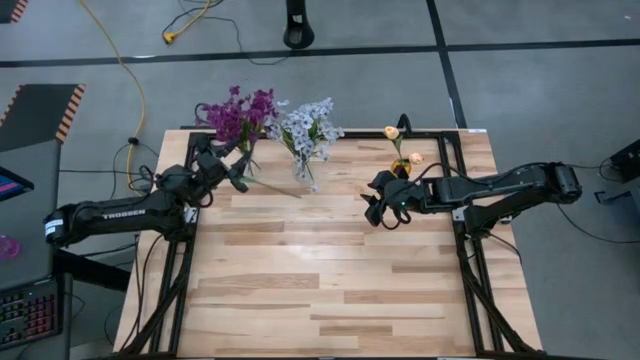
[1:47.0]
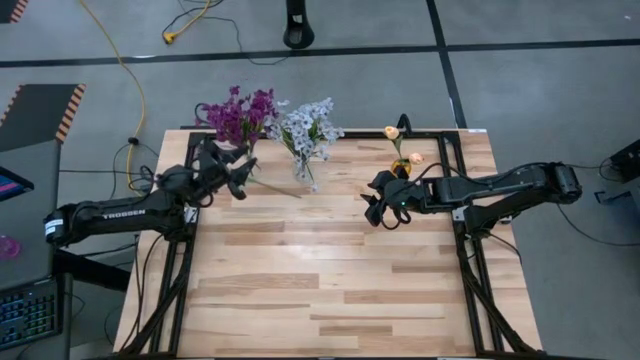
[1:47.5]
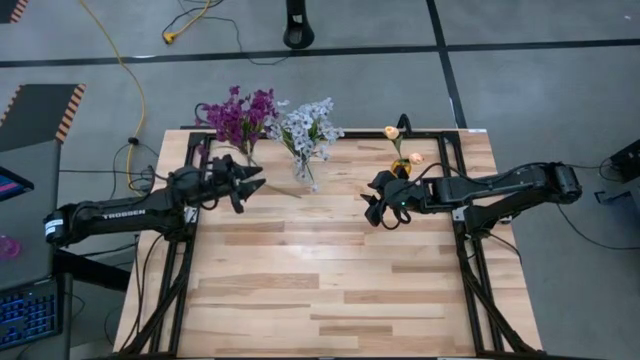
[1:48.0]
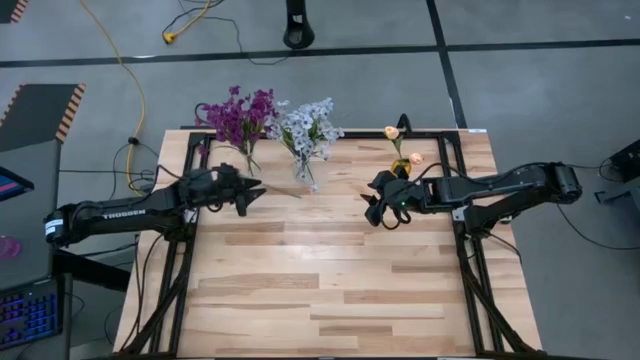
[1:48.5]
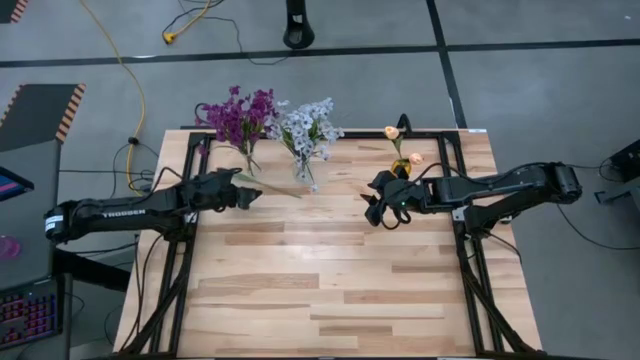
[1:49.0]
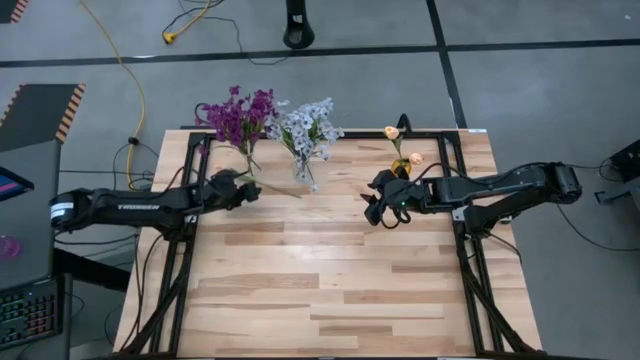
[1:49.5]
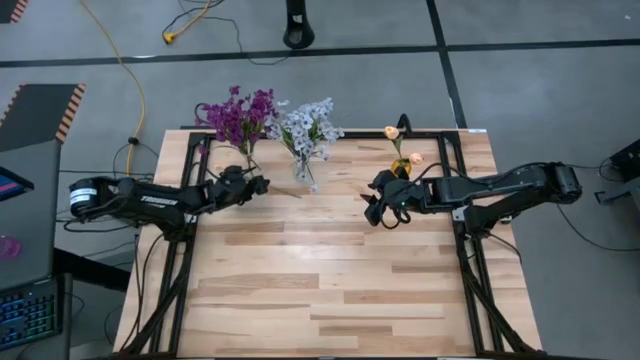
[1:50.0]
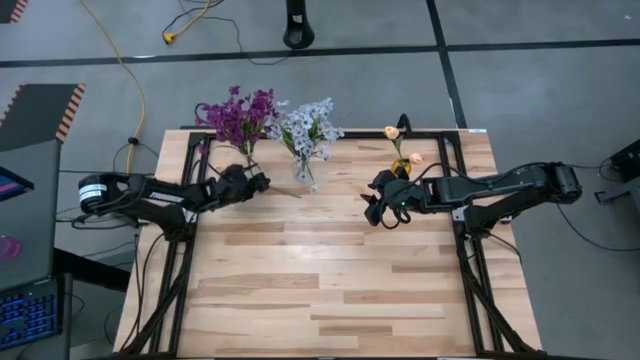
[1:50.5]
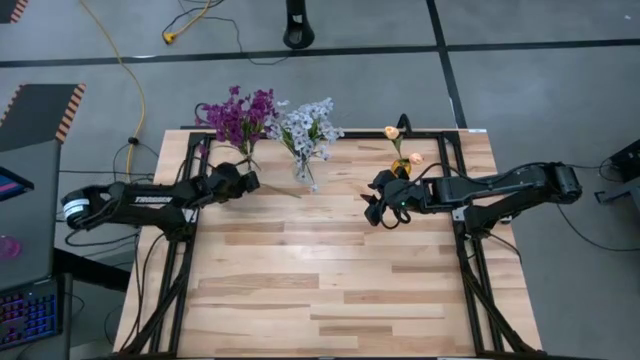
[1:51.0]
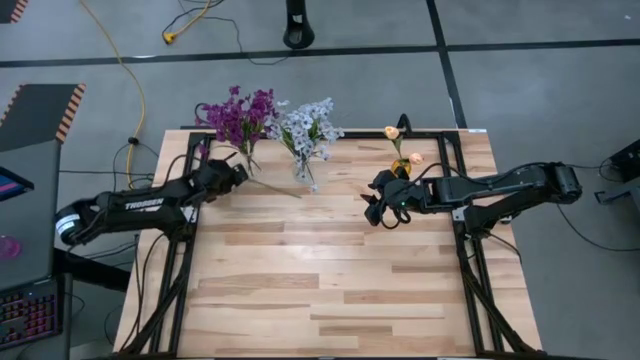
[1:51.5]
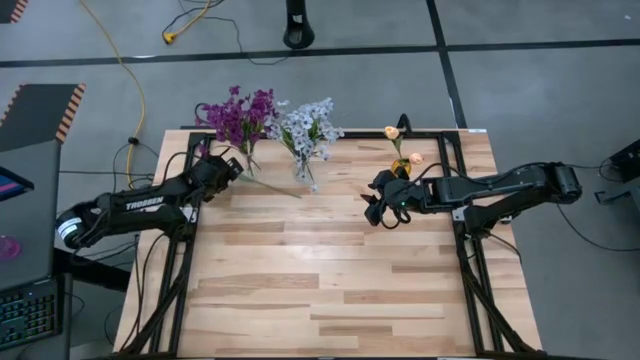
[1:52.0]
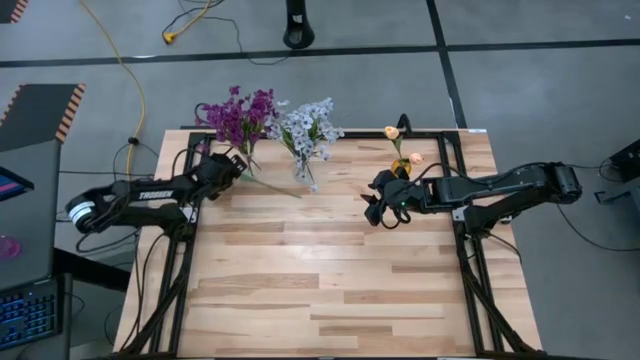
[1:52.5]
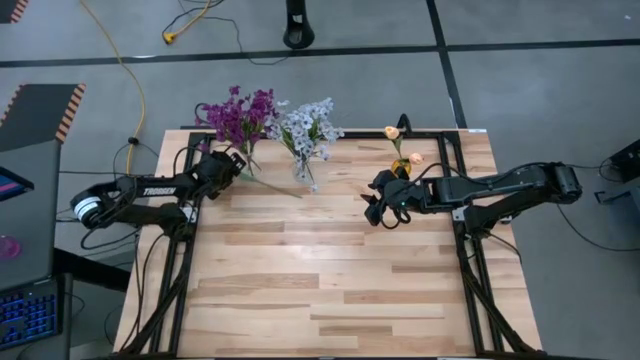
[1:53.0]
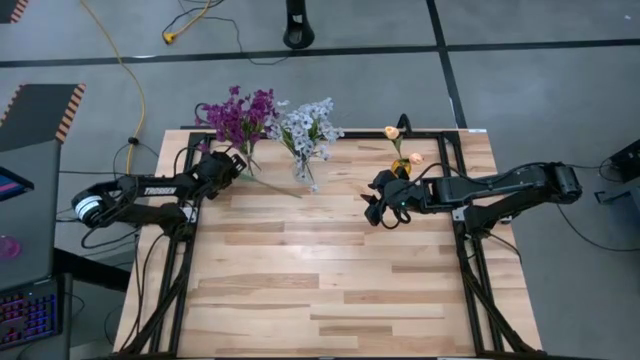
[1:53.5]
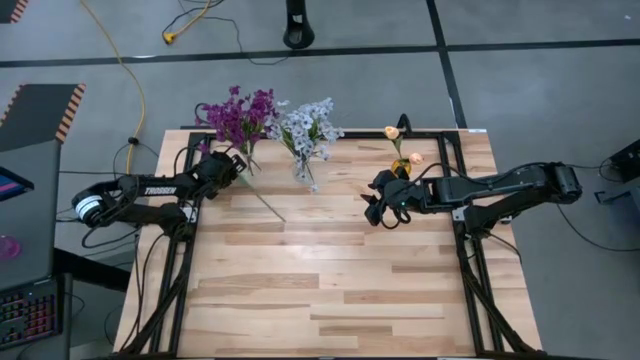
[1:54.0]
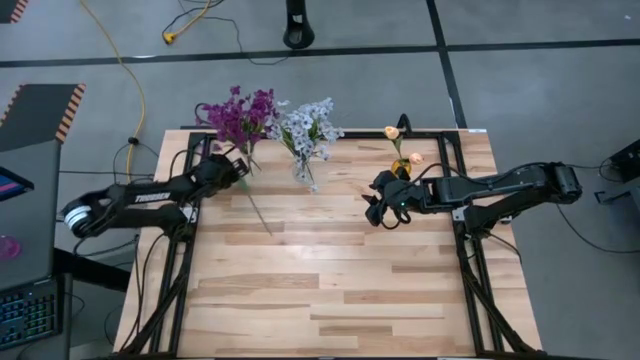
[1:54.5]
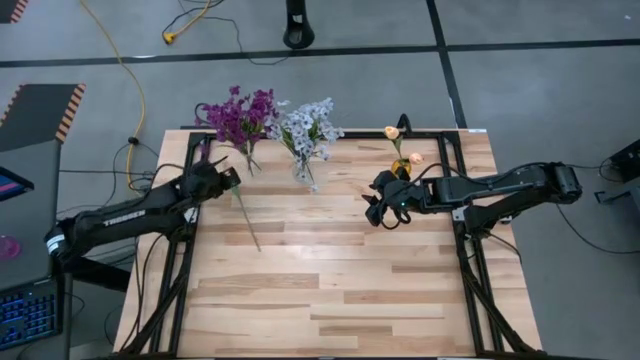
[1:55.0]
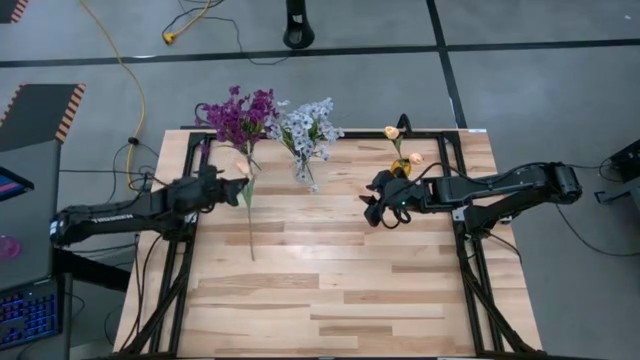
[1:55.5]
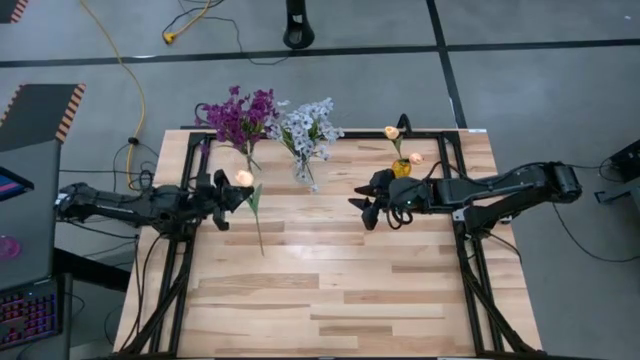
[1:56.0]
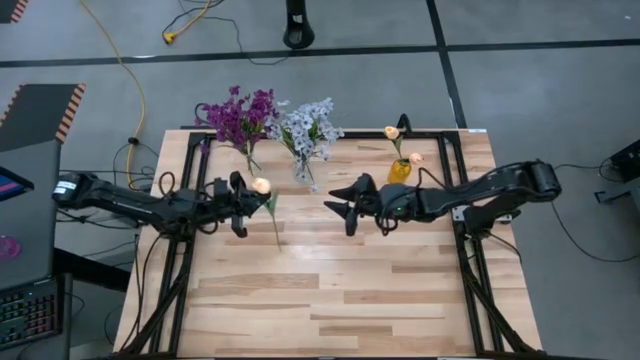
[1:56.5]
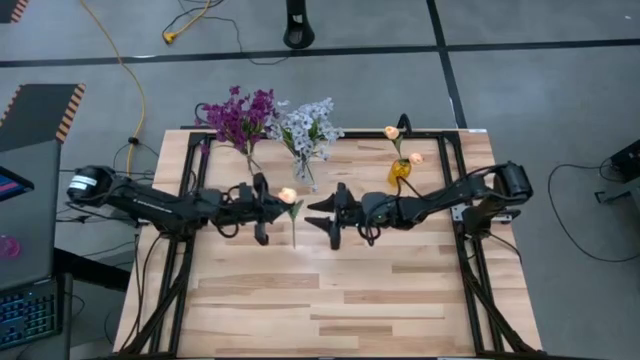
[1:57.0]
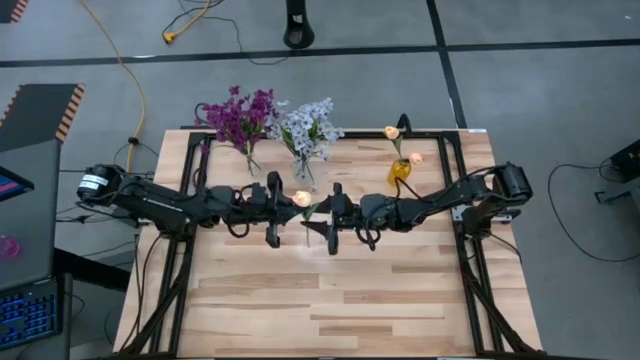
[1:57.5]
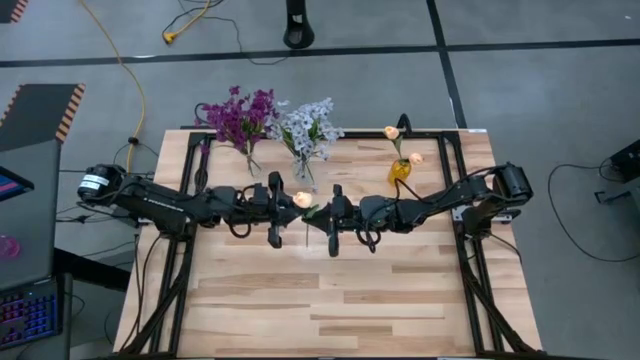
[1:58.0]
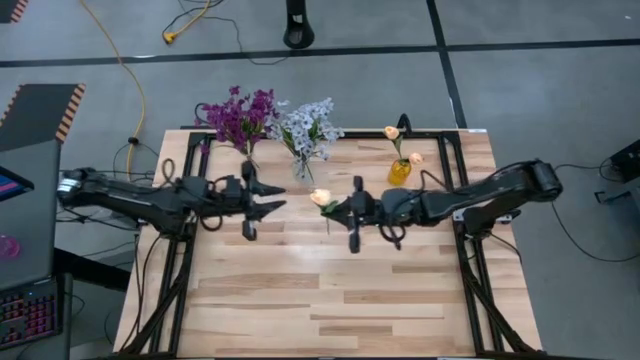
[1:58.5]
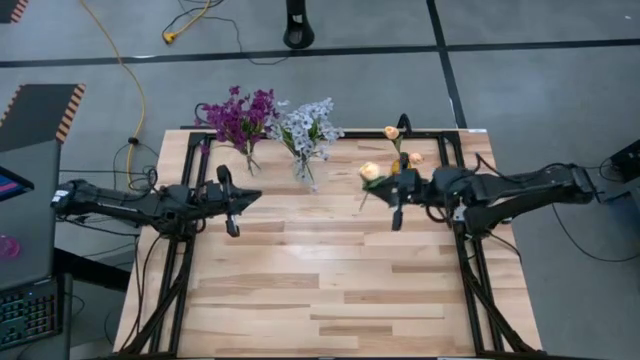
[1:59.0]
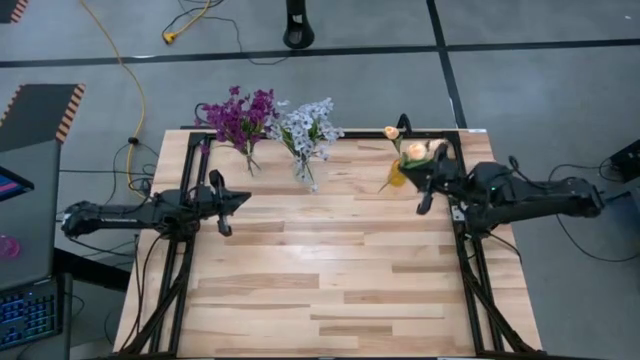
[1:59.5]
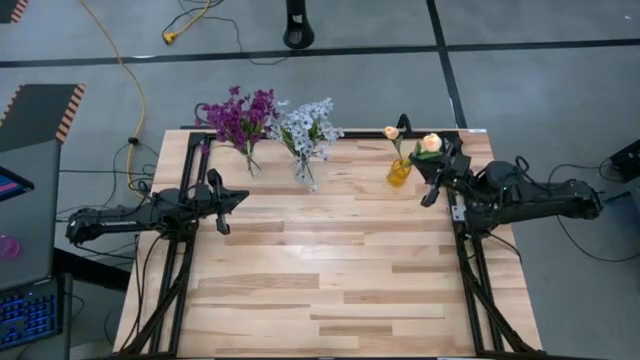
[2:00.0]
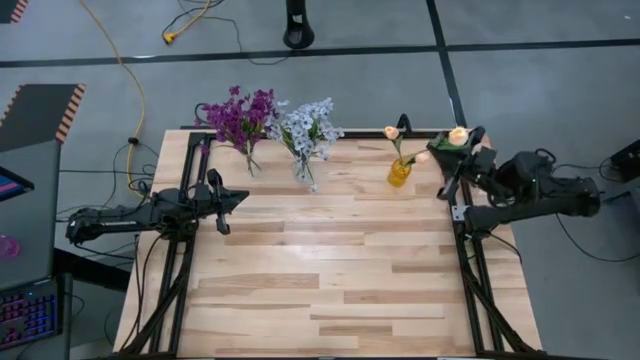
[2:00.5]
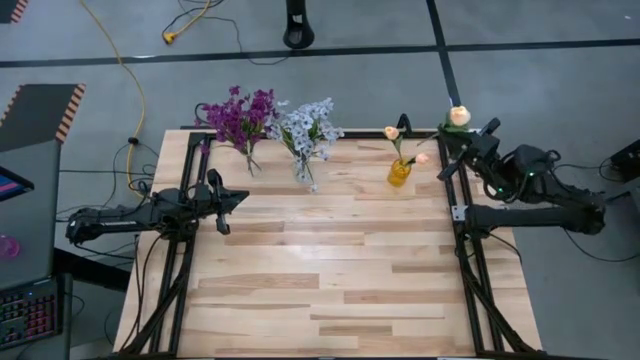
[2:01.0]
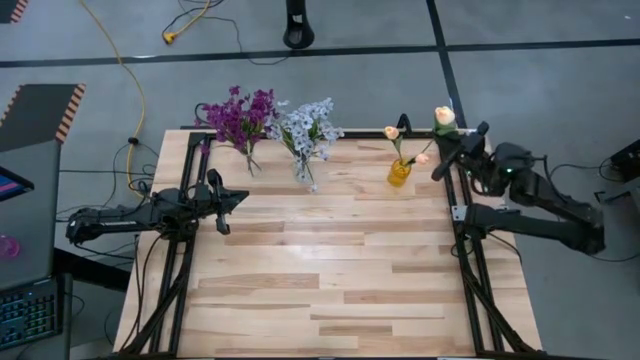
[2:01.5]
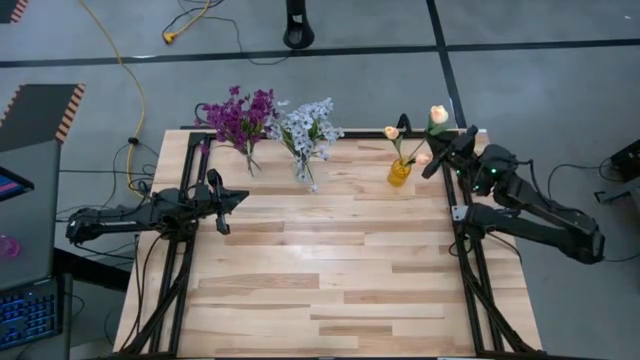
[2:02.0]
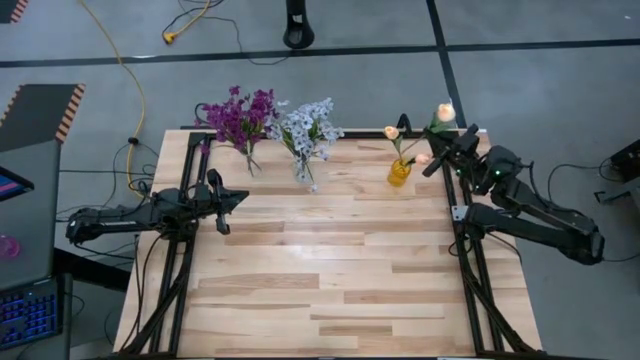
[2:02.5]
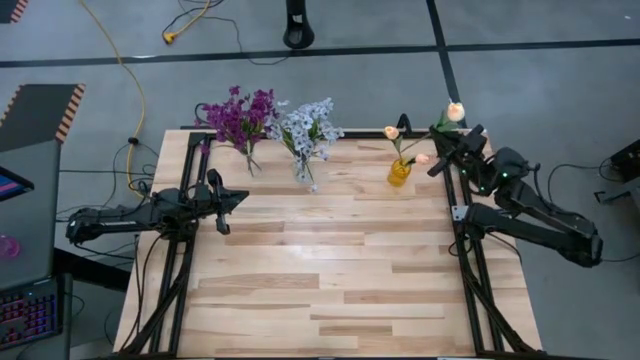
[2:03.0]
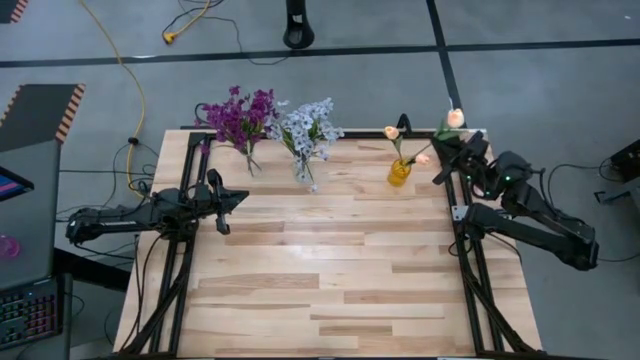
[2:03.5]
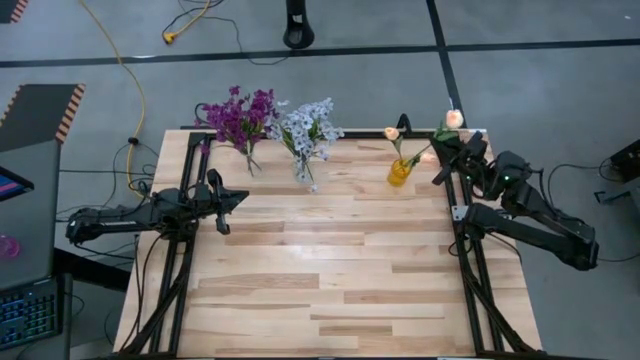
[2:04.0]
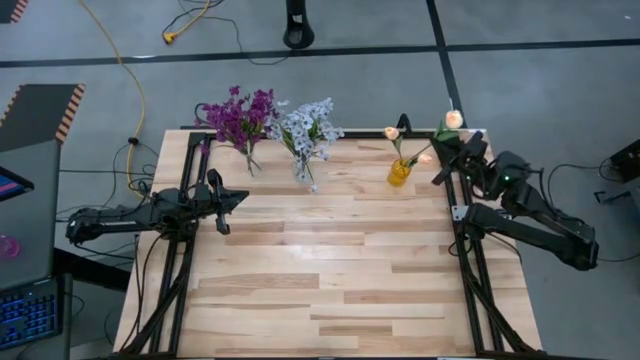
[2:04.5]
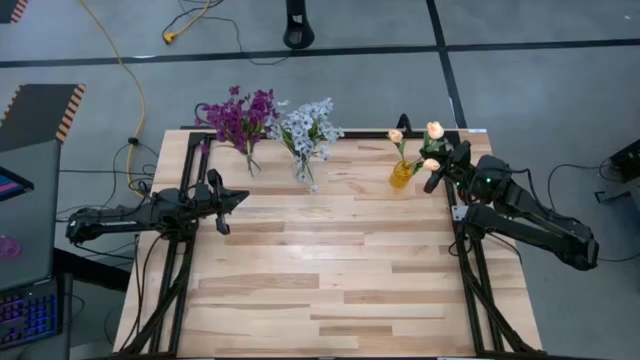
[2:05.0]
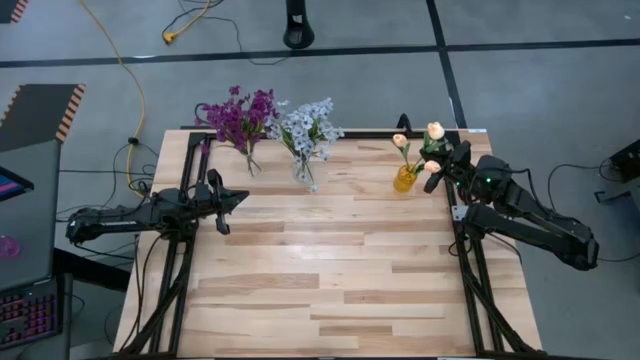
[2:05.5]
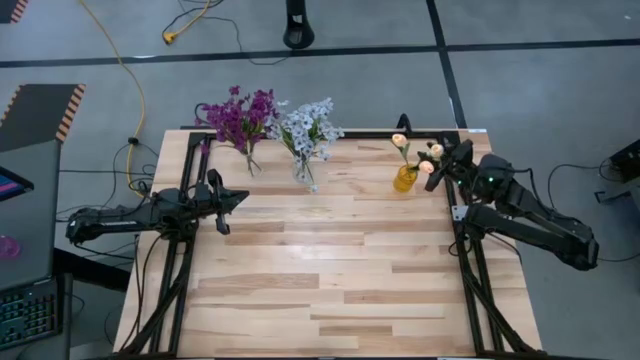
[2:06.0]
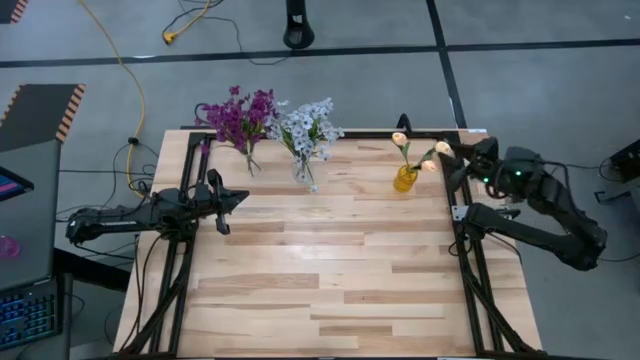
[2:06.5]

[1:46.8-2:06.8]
Task: Sort flowers into vase by color
Put the tulip into the yellow vase
